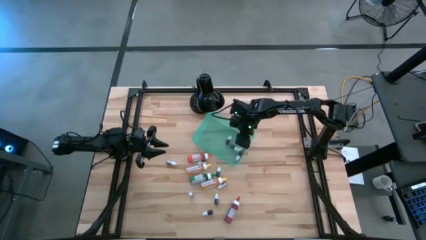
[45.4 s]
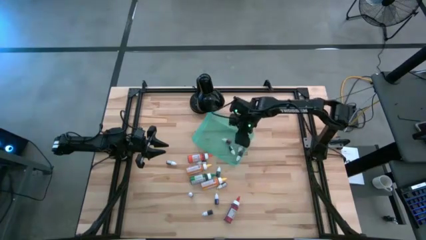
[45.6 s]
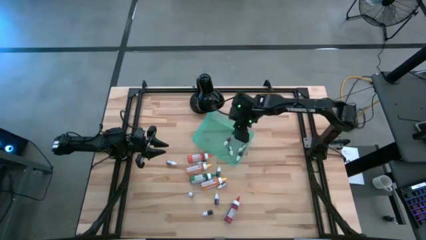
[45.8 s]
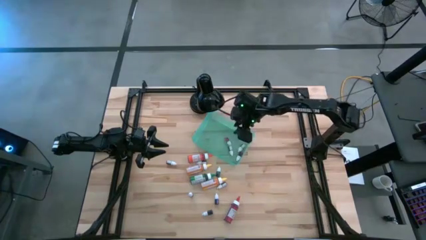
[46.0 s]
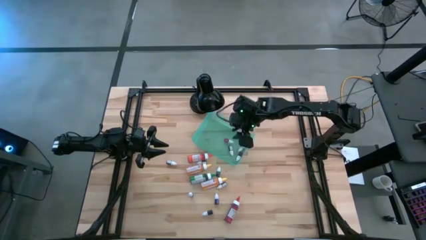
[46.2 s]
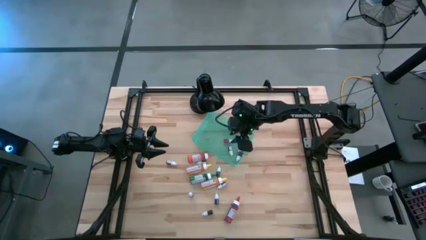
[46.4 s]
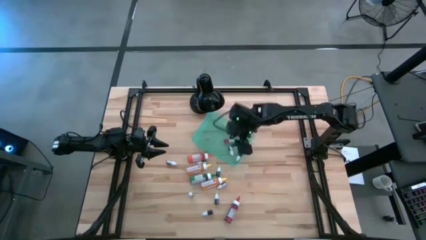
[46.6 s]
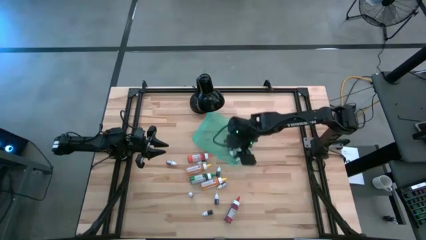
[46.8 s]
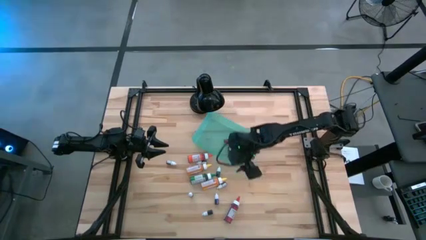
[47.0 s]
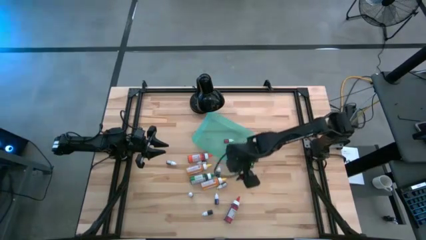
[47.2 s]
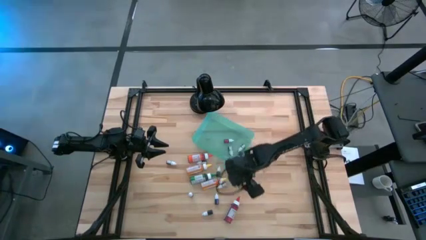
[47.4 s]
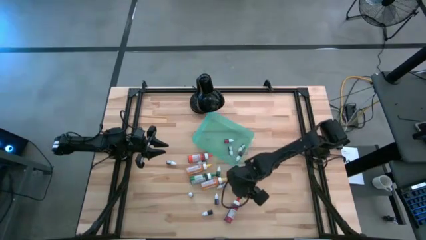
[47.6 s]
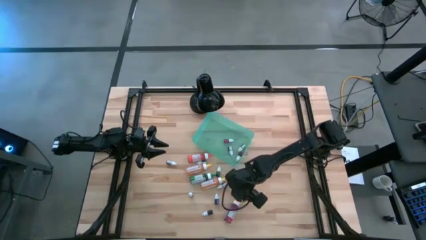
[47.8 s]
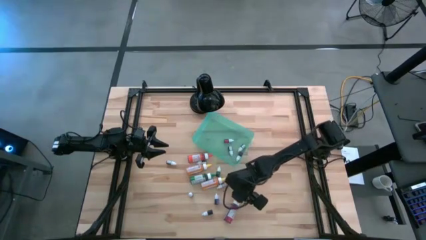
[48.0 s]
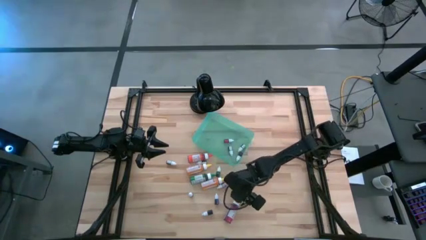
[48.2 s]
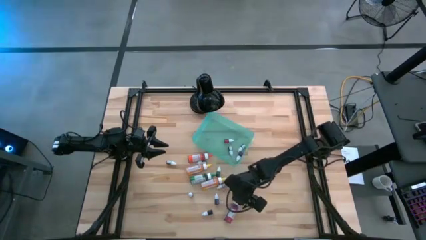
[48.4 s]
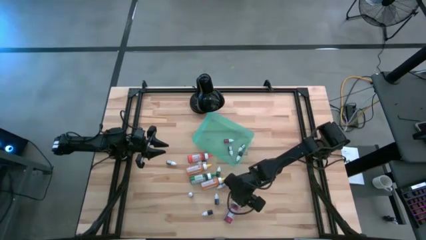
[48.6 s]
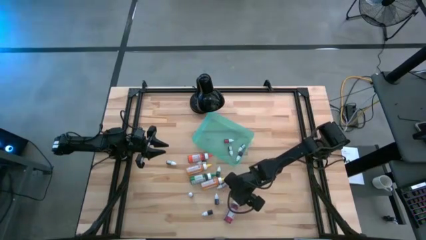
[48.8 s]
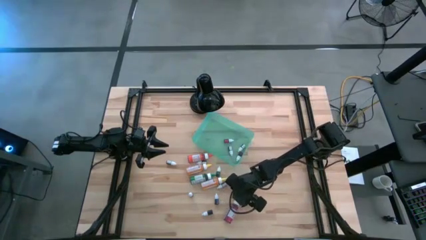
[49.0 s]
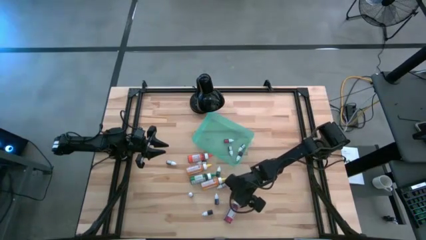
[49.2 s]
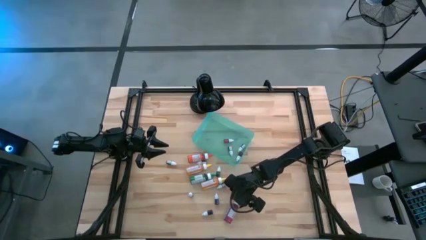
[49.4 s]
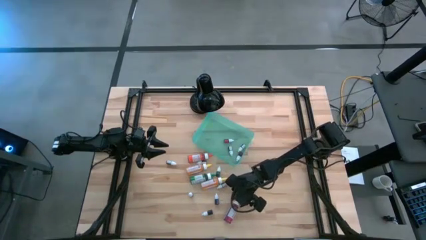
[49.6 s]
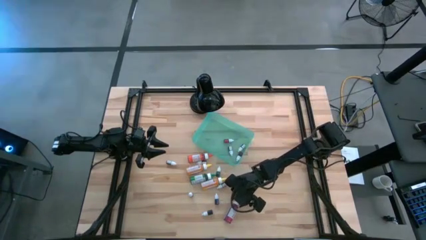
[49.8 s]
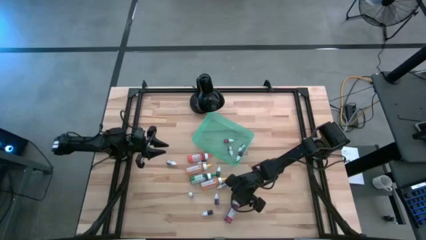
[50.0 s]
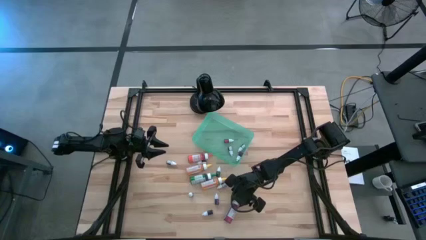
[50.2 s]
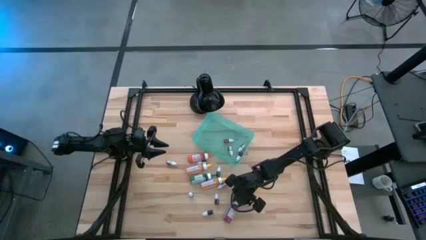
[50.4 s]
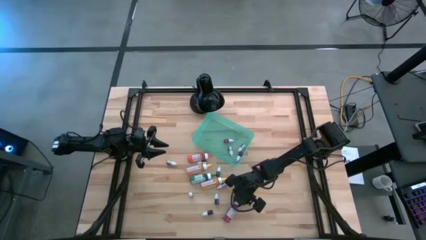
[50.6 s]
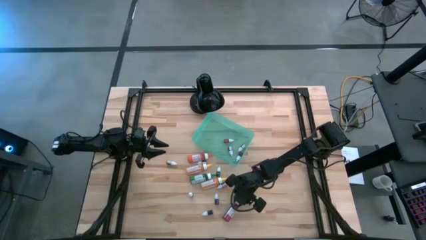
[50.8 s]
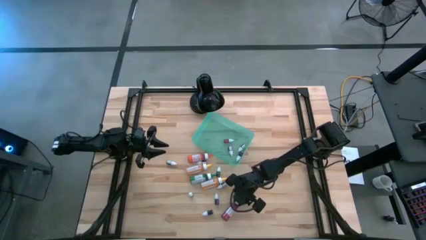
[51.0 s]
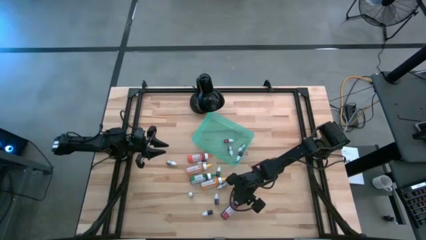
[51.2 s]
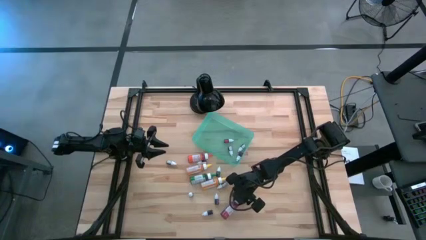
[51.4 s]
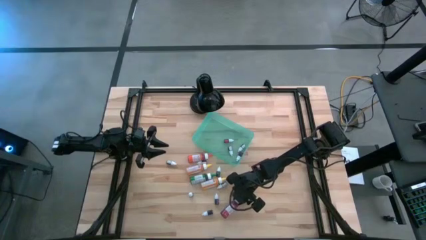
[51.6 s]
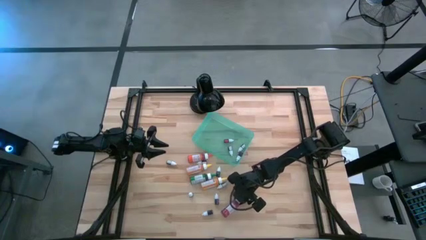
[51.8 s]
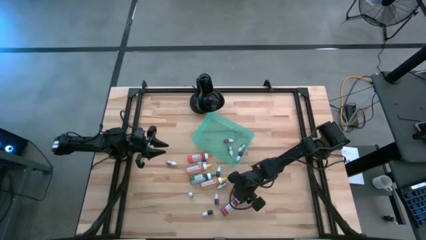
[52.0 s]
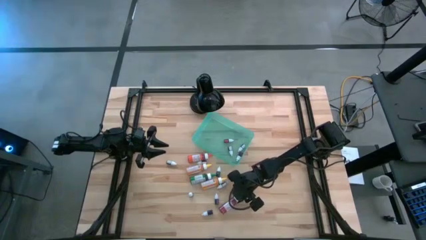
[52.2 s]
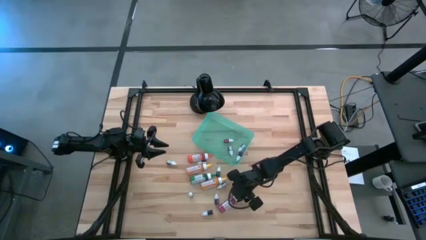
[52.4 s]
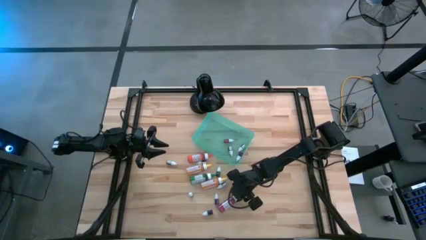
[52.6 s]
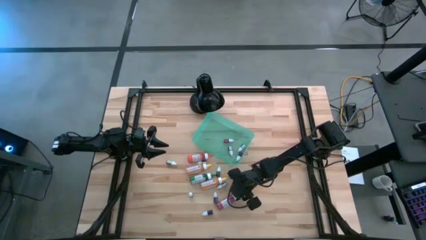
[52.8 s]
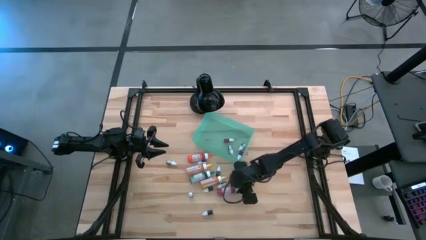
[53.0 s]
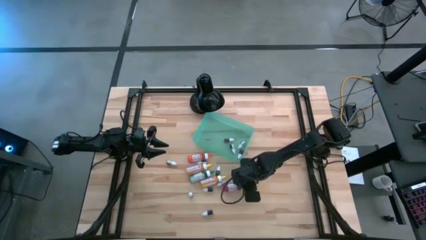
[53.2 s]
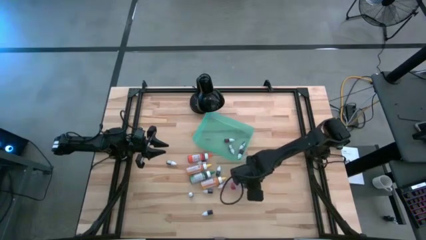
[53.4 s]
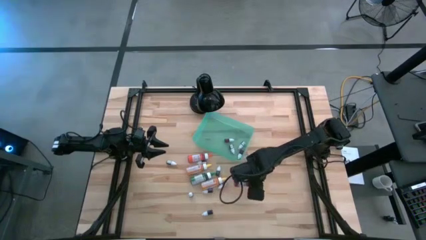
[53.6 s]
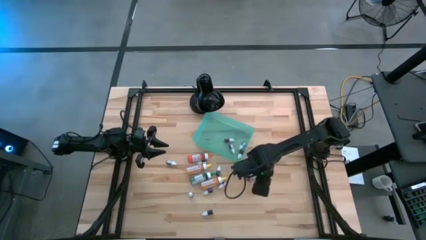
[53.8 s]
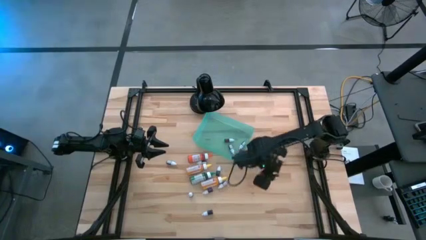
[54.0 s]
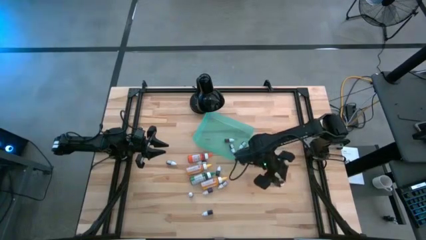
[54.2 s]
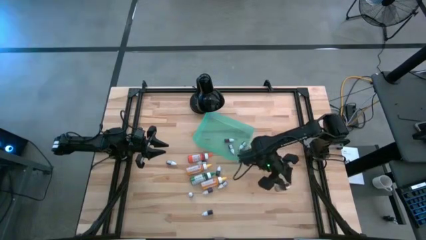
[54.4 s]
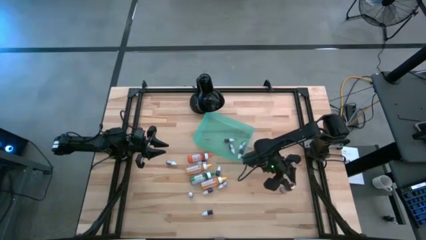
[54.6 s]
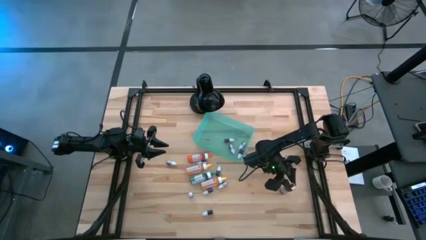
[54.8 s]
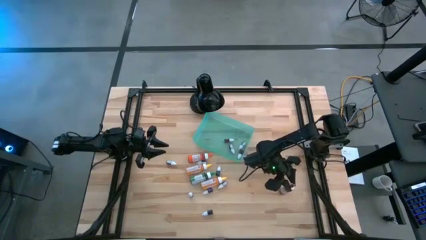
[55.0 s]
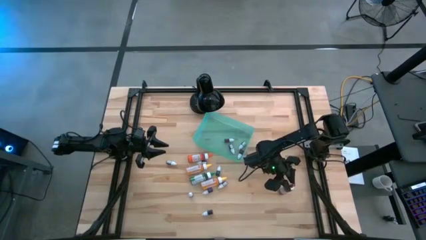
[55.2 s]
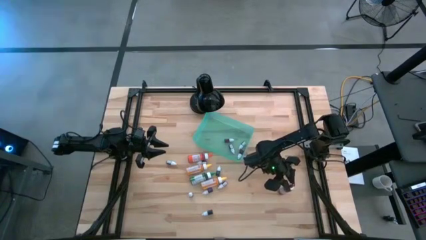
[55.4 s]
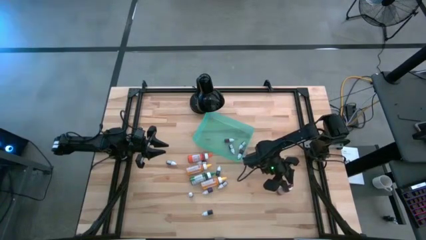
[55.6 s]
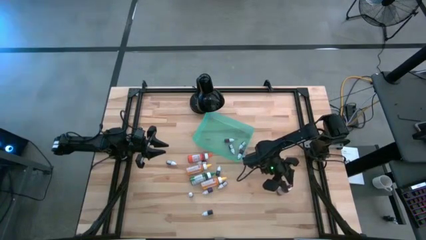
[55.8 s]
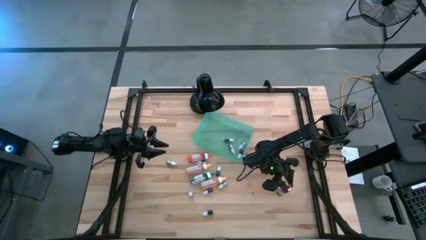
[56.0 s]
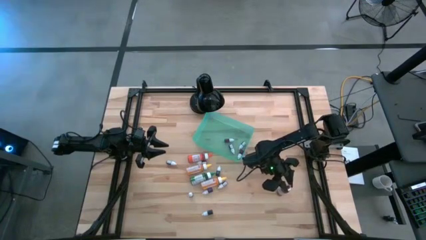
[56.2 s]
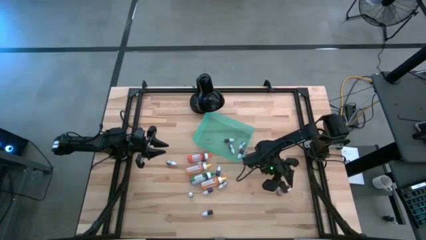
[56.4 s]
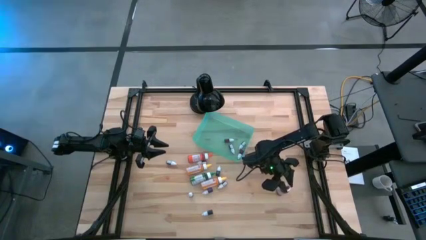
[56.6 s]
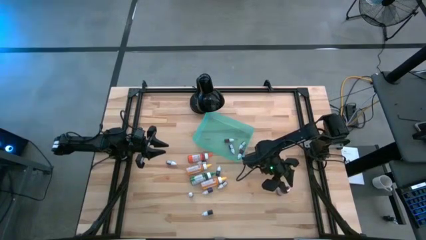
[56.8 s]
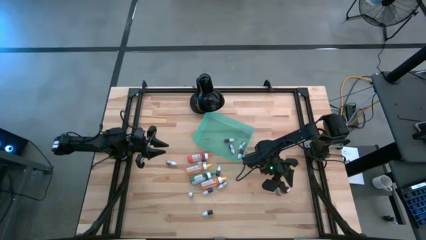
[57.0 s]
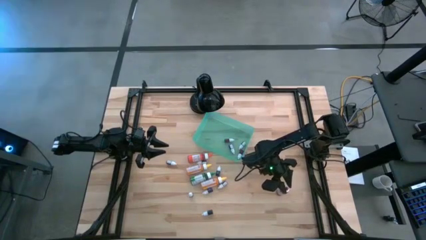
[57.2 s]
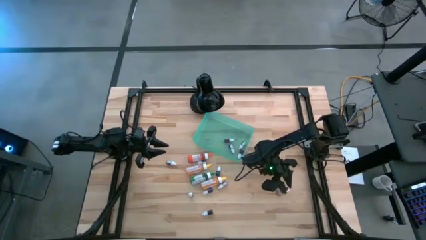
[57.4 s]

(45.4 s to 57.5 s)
Task: Pick & Place food coloring
Put the large red food coloring bottle into the green bin

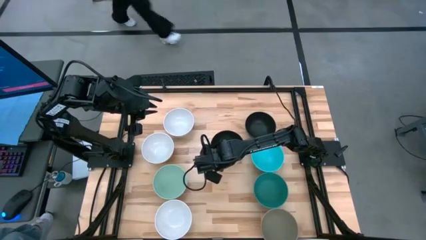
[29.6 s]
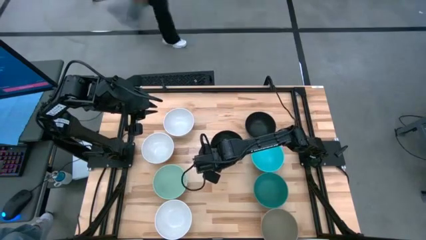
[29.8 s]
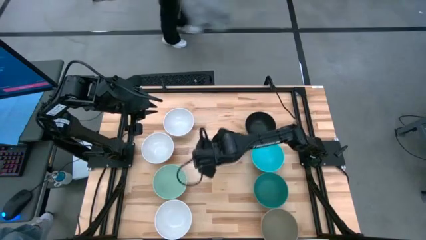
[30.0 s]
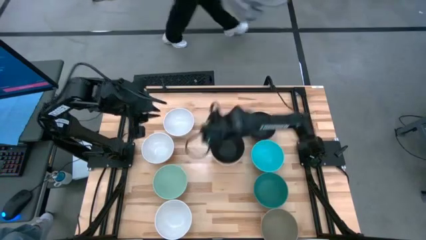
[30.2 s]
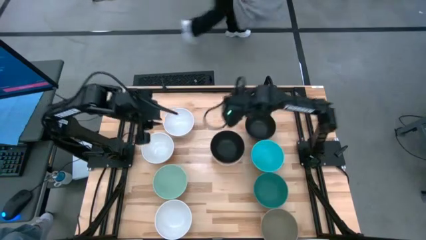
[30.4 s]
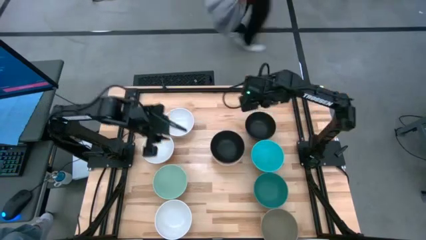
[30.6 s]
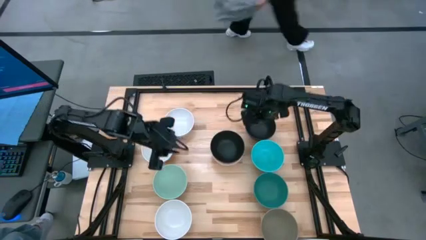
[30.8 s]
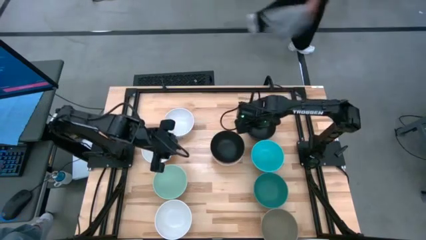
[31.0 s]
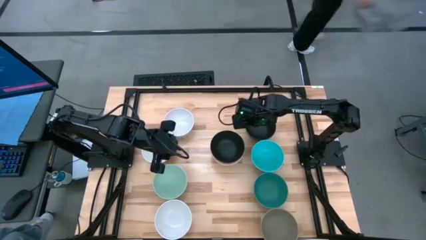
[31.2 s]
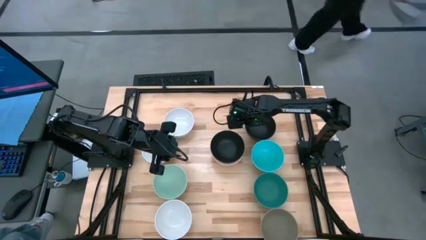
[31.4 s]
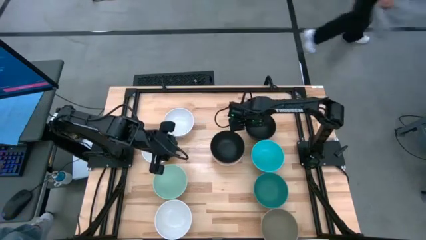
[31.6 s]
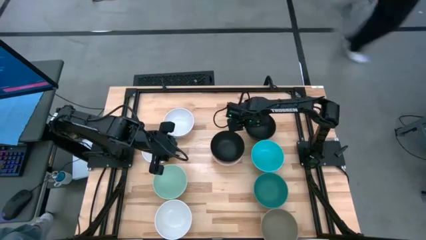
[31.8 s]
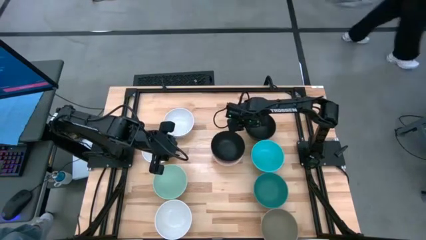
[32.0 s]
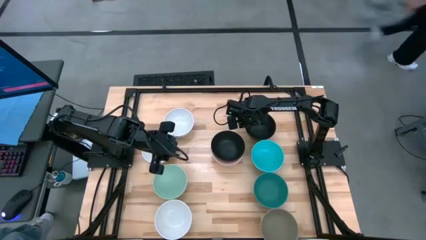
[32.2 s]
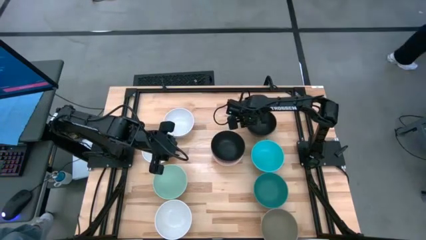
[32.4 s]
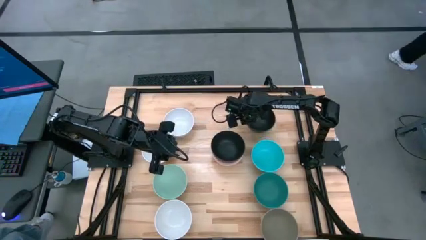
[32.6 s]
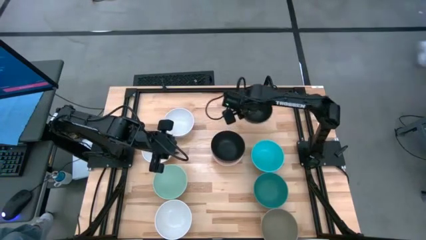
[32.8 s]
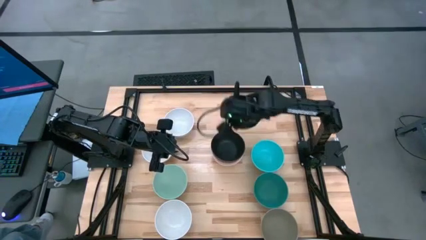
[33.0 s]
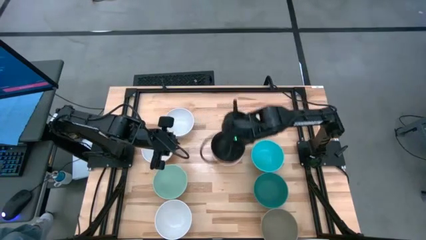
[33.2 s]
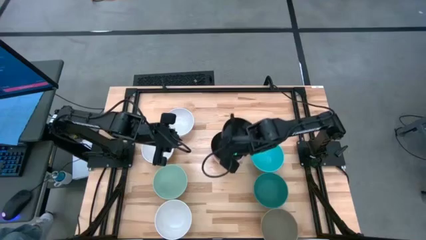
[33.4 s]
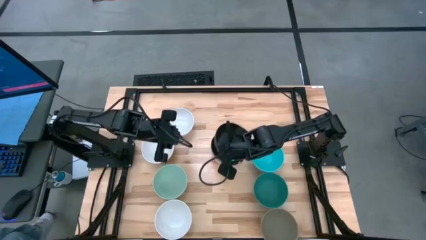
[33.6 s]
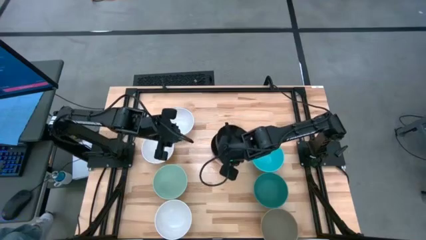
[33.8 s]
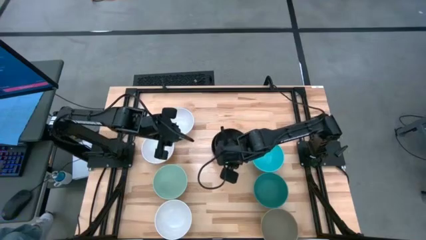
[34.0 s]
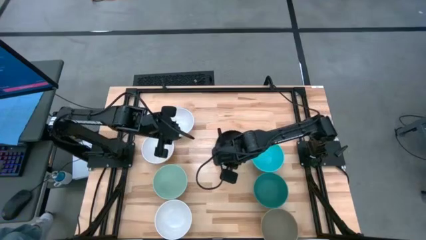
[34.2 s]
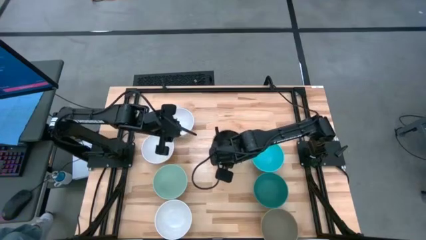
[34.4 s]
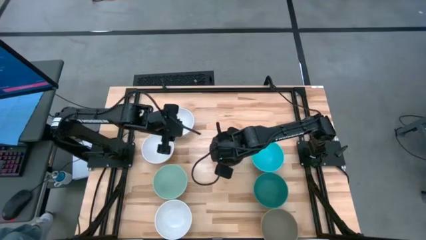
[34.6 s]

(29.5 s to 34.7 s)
Task: Nest bowls inside each other
Stack the black bowl on the black bowl
